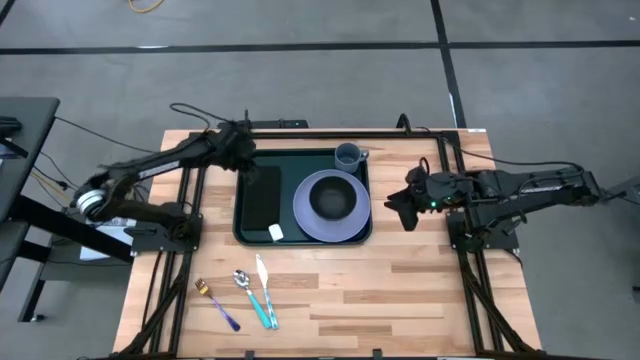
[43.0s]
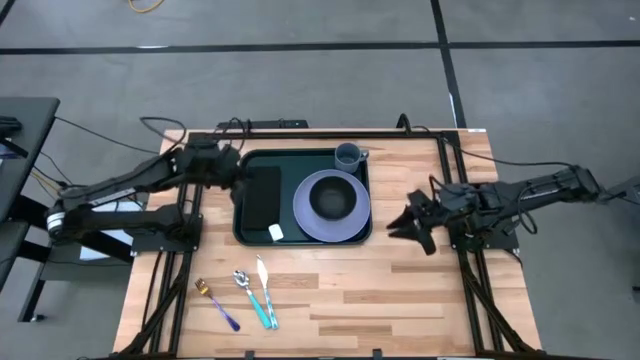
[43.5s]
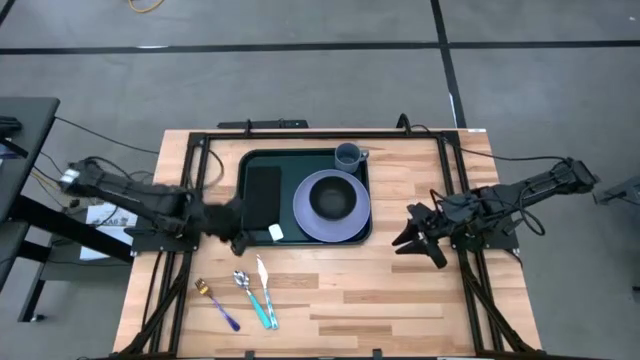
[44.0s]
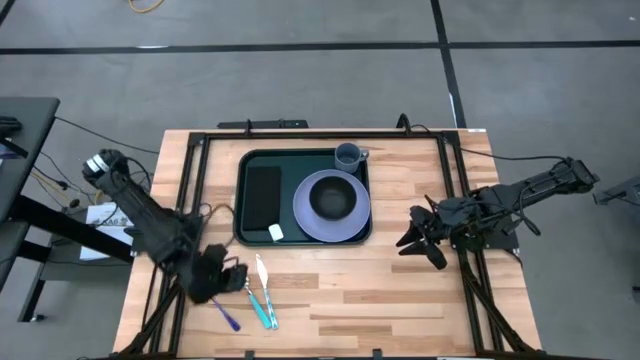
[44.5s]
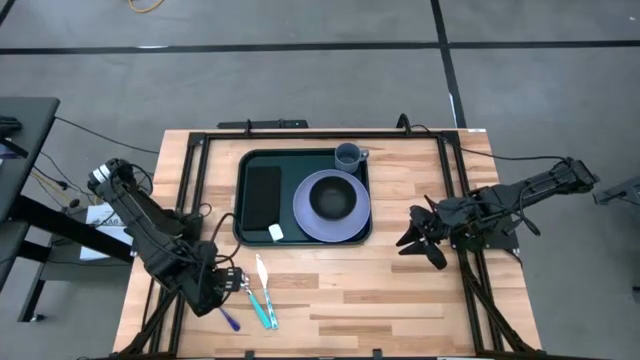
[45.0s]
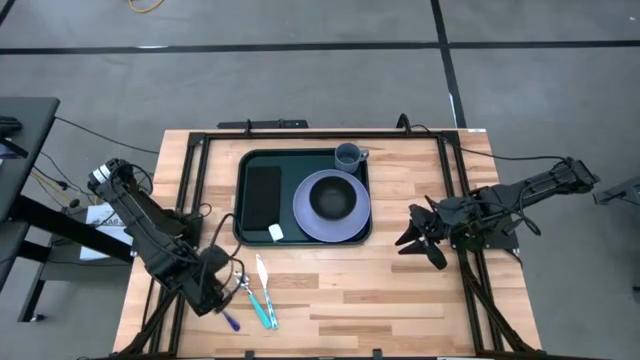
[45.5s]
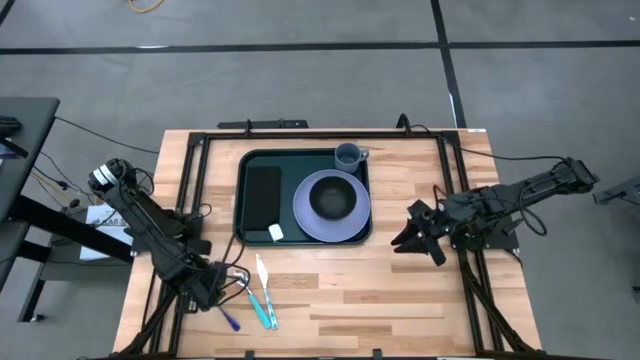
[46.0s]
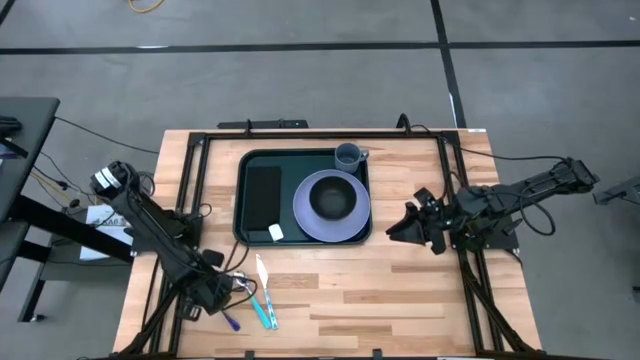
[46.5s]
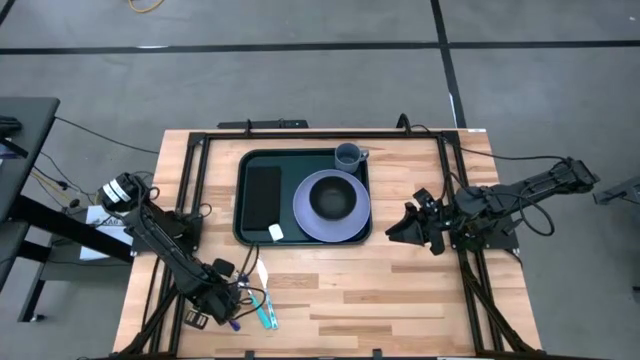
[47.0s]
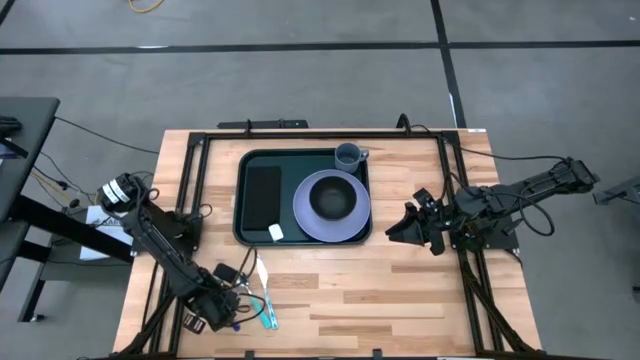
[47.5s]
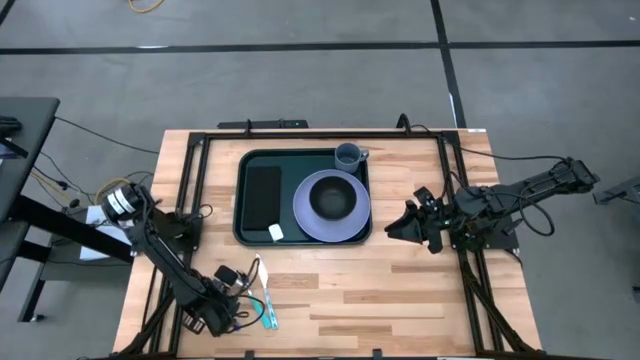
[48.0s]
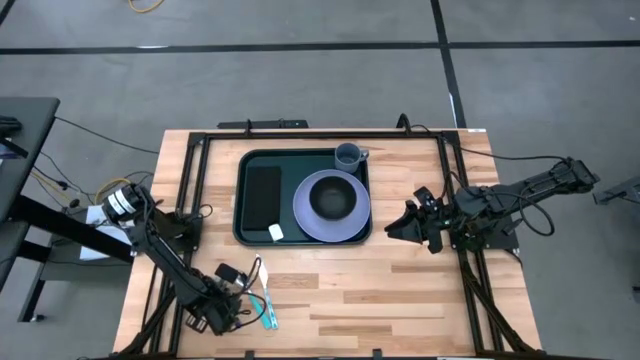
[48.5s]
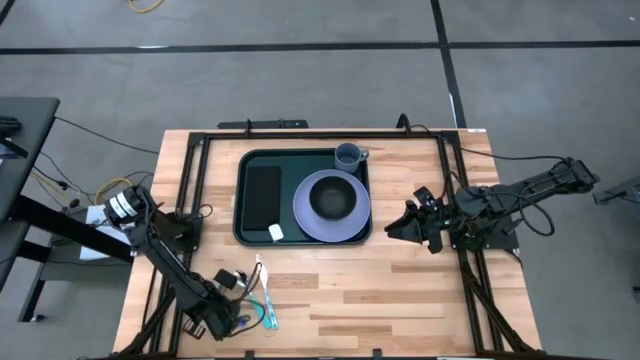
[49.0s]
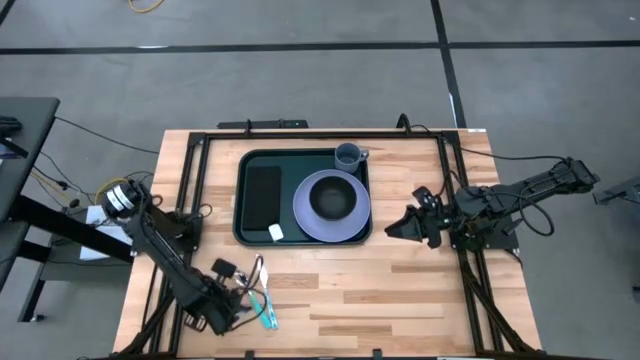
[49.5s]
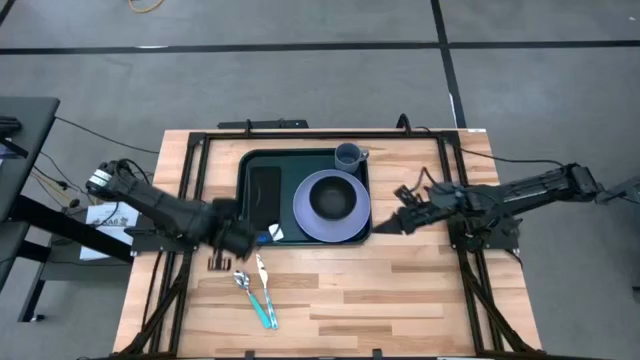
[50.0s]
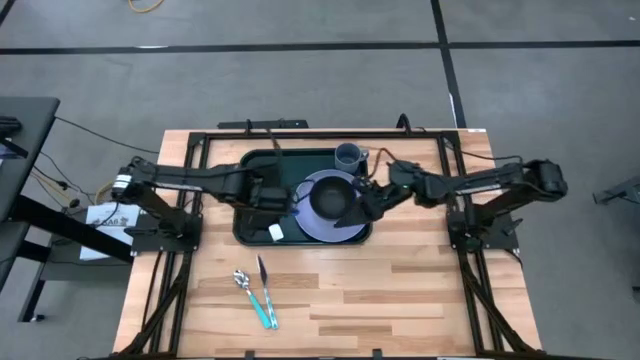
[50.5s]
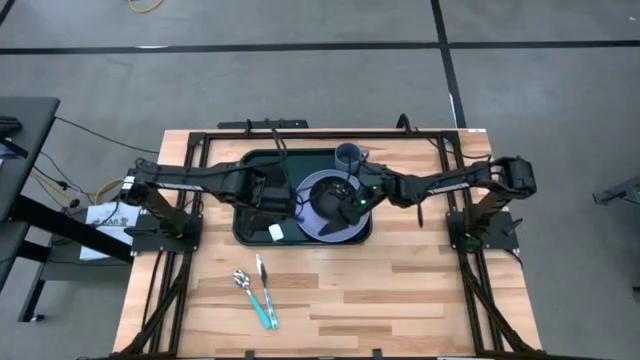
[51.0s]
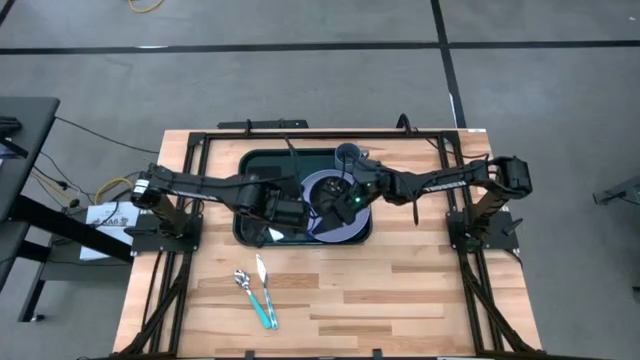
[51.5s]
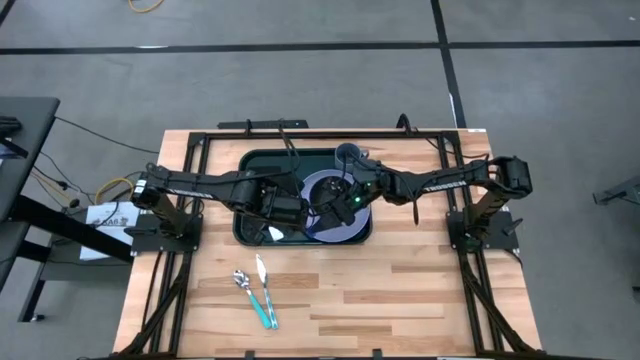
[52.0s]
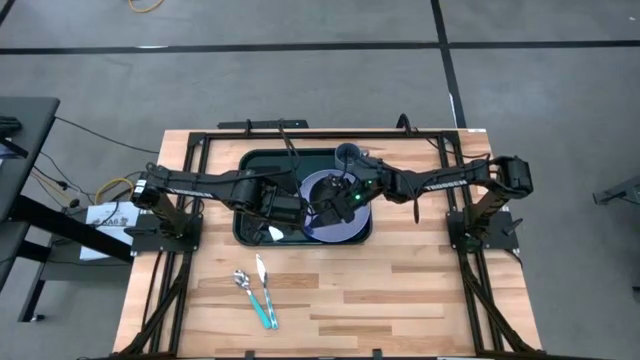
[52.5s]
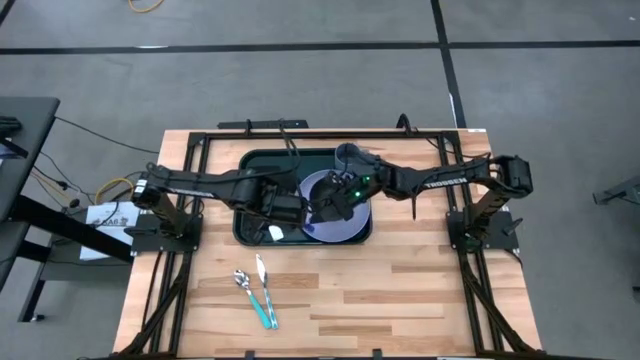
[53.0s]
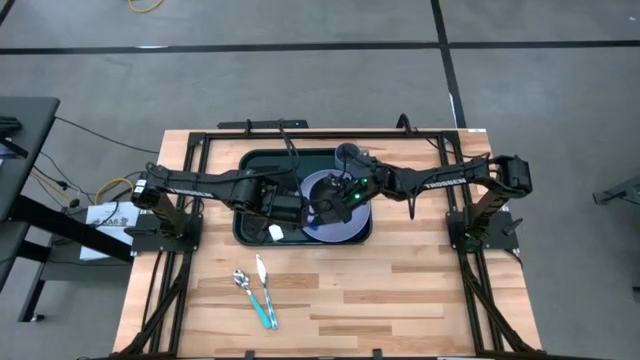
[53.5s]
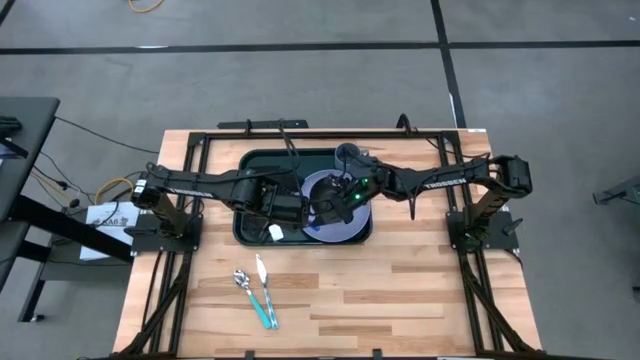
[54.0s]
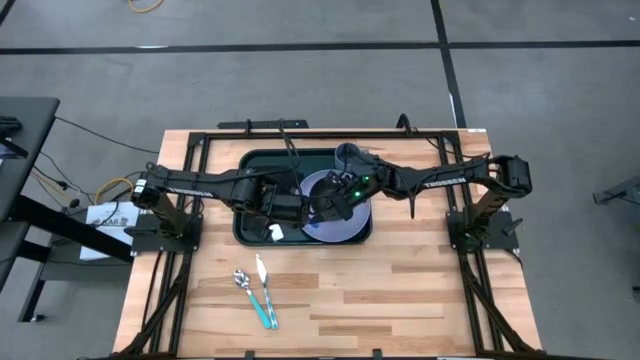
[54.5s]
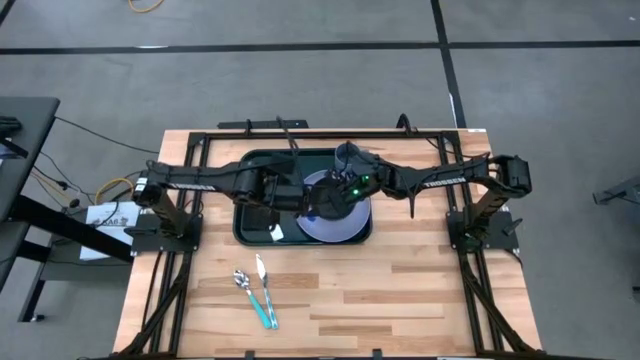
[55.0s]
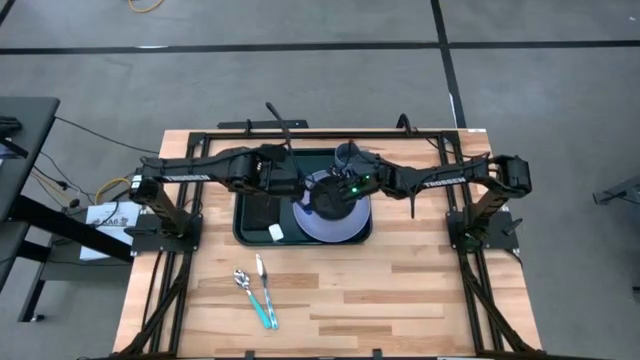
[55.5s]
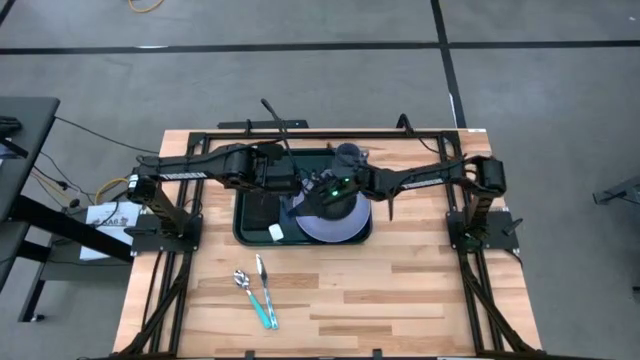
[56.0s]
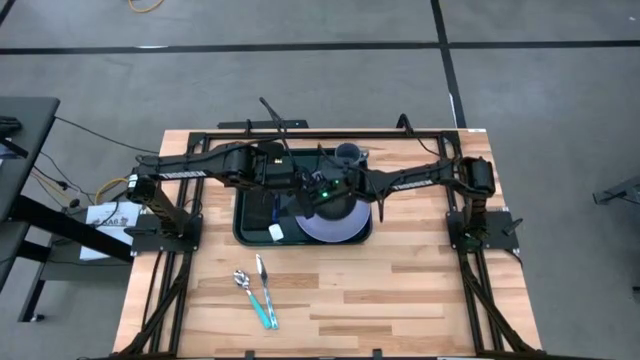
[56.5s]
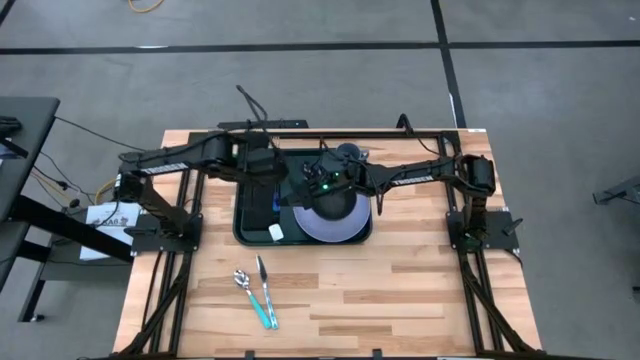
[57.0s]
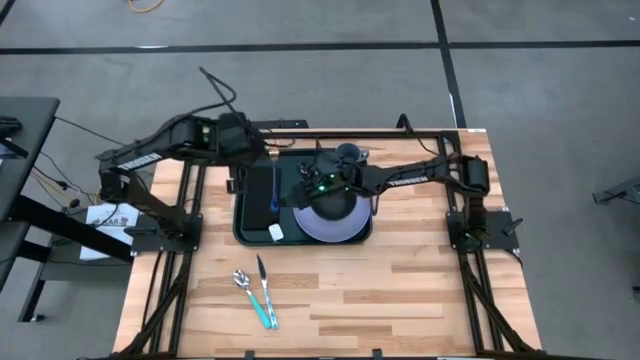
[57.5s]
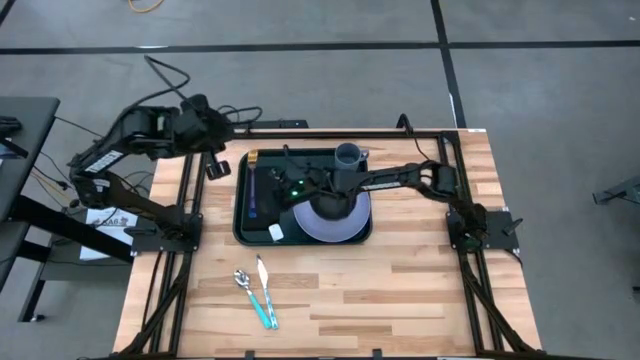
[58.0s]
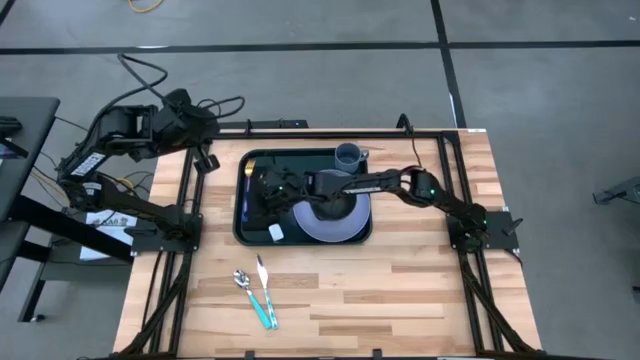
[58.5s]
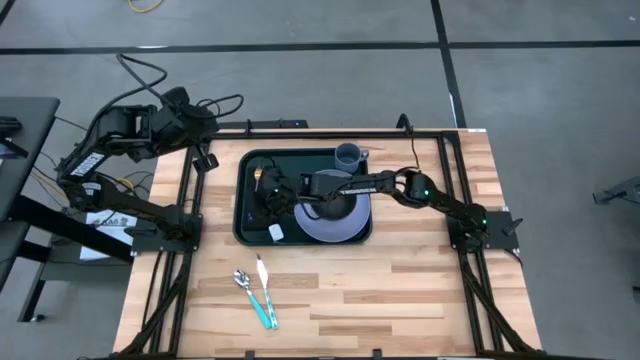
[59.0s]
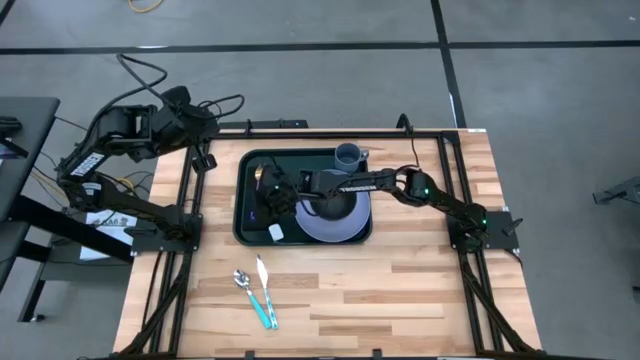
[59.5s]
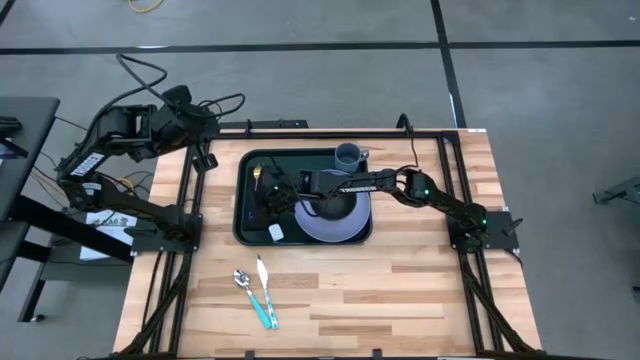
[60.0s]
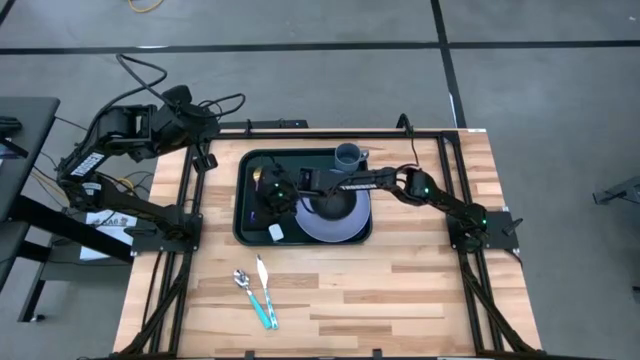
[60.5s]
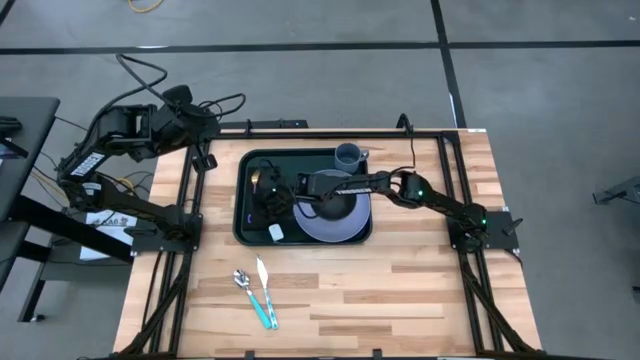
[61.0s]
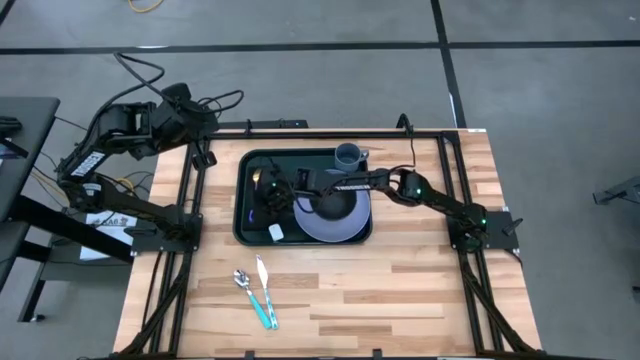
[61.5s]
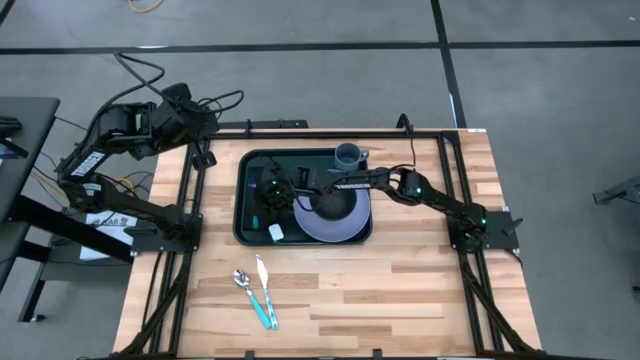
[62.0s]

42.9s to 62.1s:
Task: Set up tray
Put the purple fork on the black table napkin

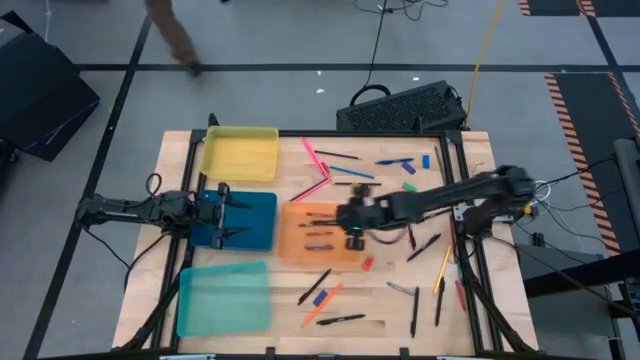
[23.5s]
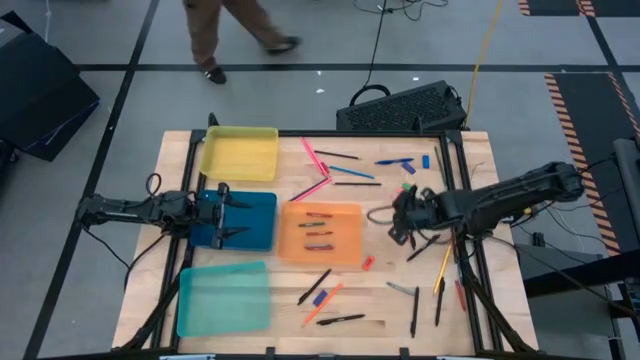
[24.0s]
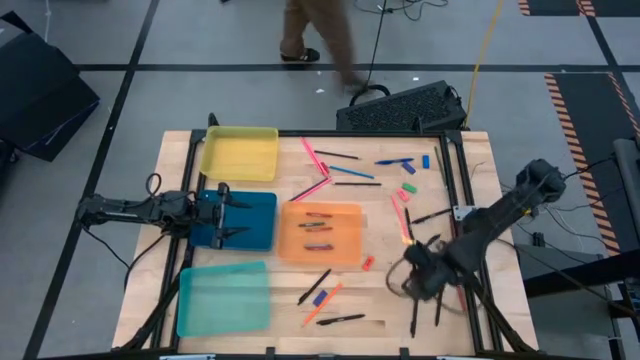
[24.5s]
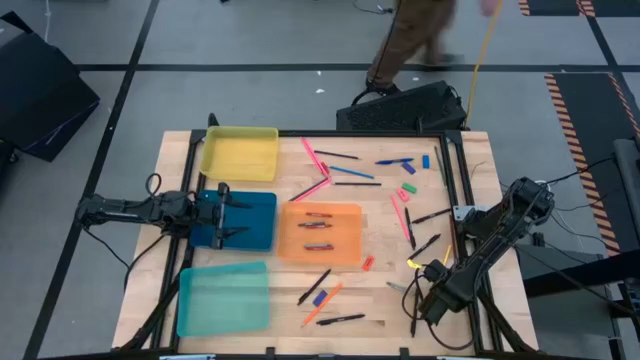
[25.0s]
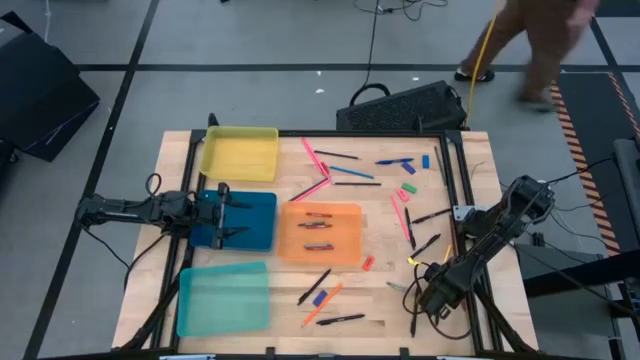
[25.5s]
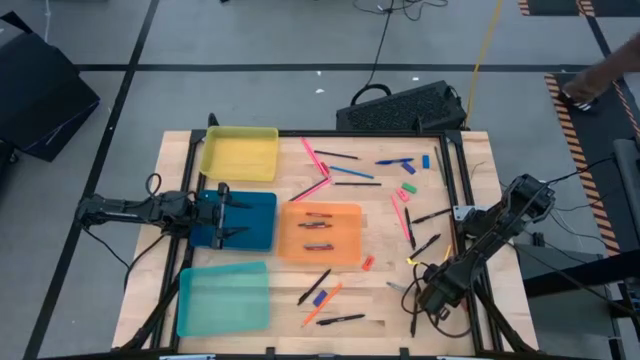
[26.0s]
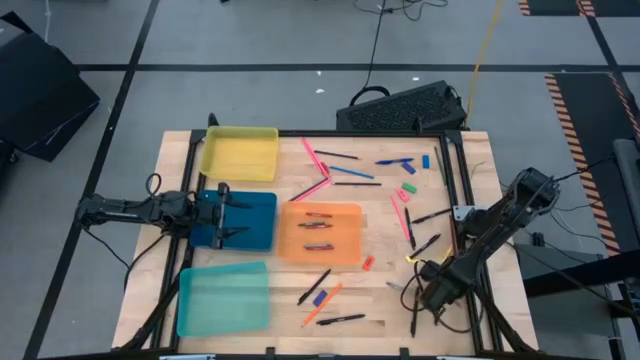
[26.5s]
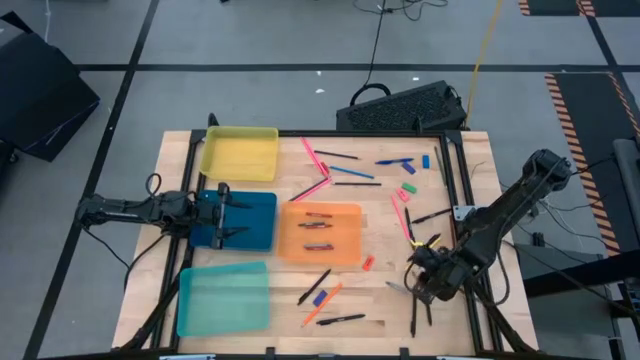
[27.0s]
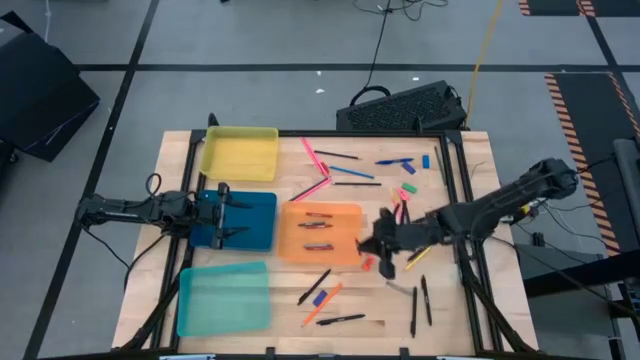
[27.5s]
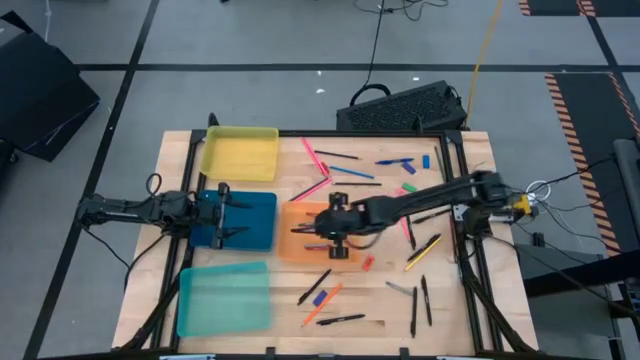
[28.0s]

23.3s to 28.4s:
Task: Sort crayons/erasers/pens/pencils in bins
Put the red crayon into the orange bin
